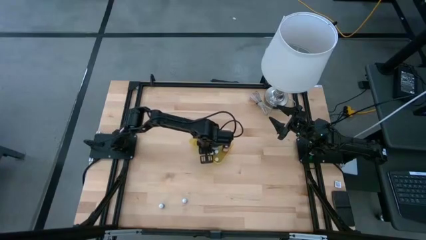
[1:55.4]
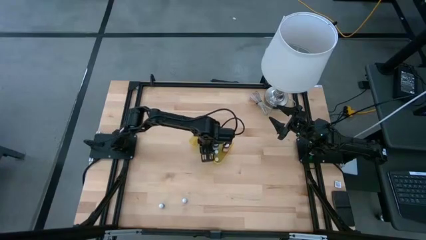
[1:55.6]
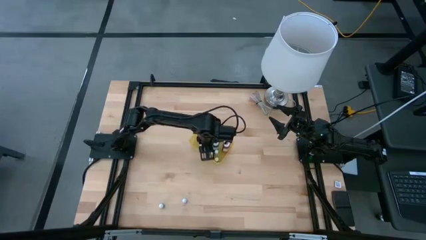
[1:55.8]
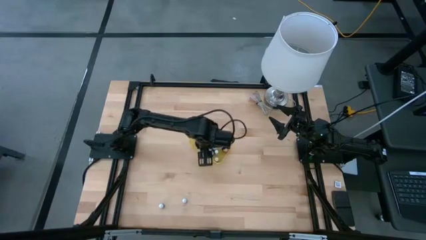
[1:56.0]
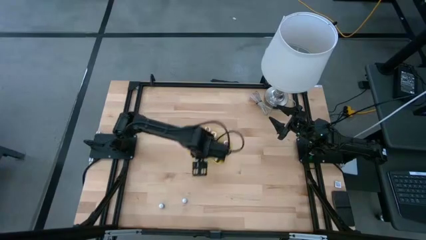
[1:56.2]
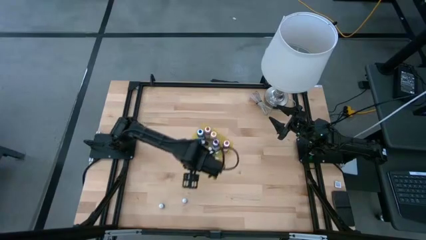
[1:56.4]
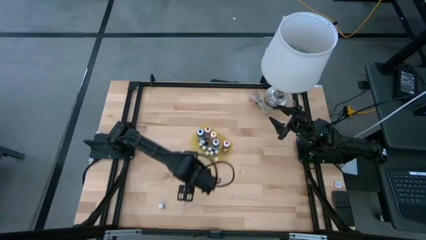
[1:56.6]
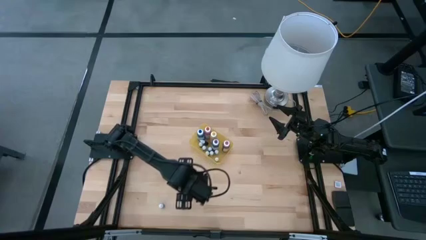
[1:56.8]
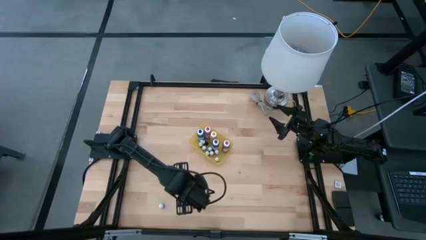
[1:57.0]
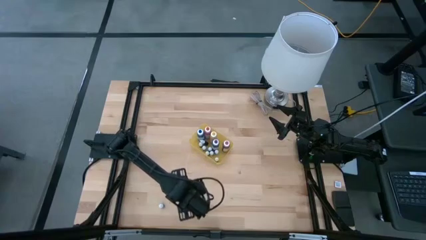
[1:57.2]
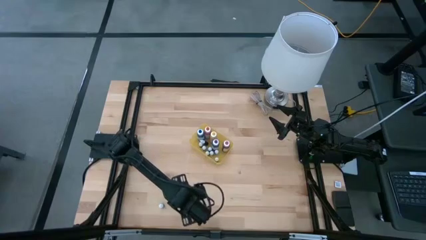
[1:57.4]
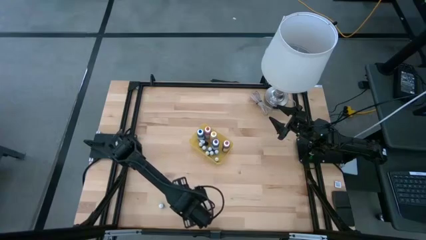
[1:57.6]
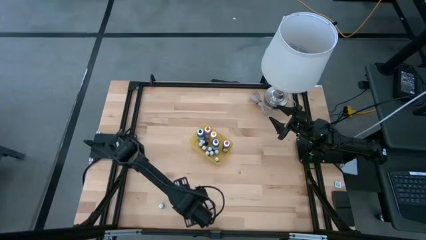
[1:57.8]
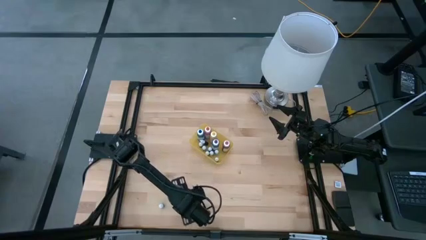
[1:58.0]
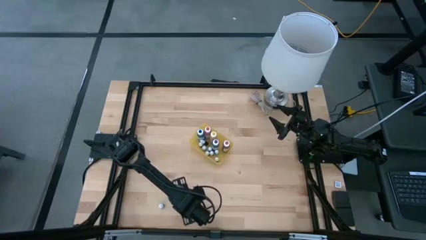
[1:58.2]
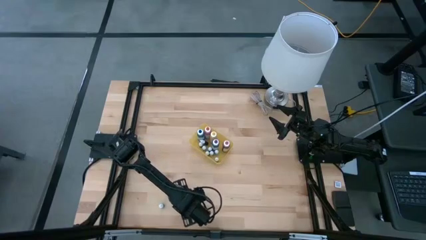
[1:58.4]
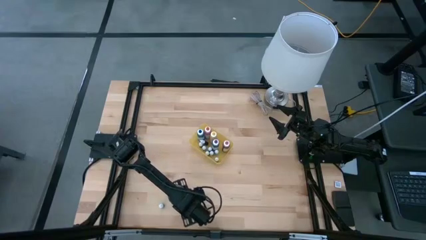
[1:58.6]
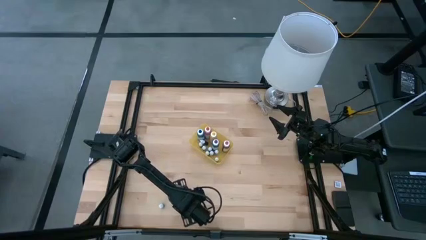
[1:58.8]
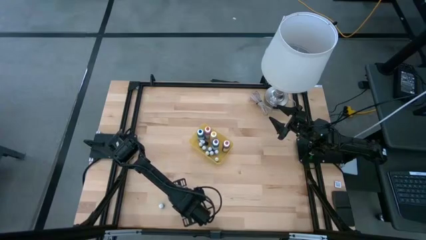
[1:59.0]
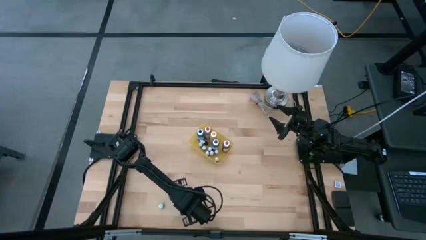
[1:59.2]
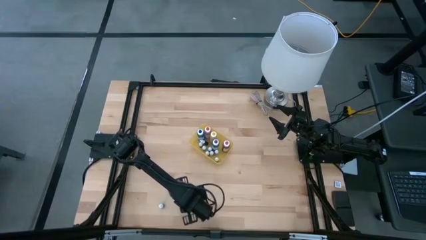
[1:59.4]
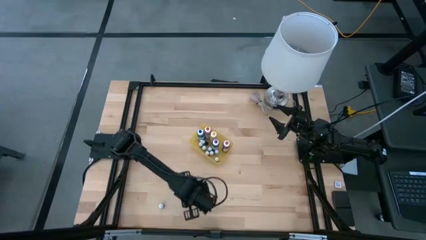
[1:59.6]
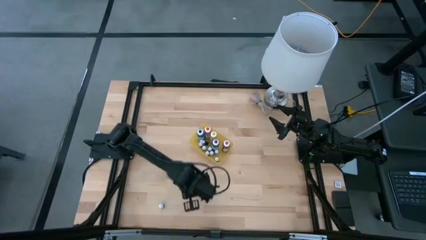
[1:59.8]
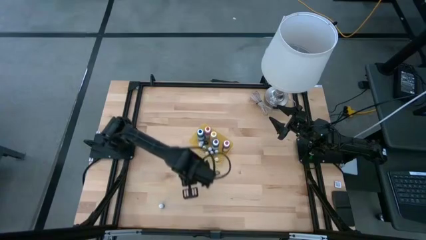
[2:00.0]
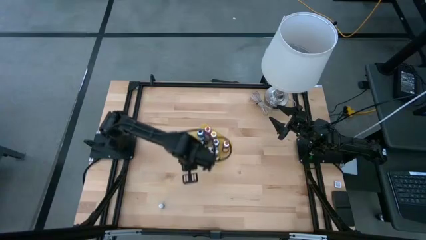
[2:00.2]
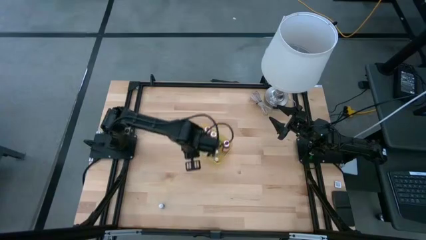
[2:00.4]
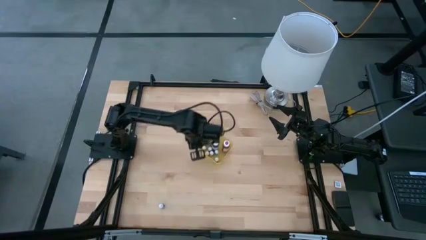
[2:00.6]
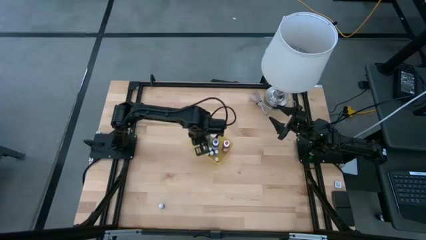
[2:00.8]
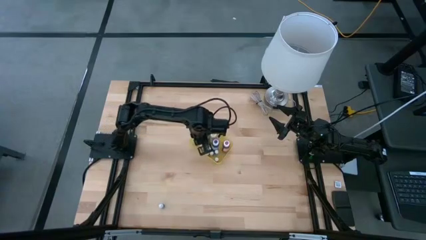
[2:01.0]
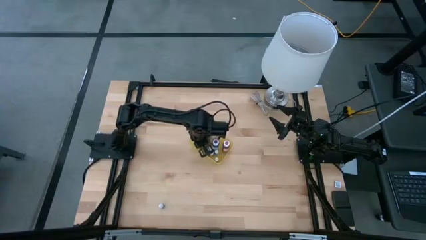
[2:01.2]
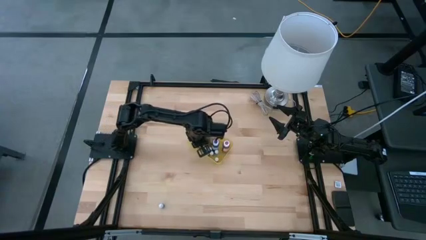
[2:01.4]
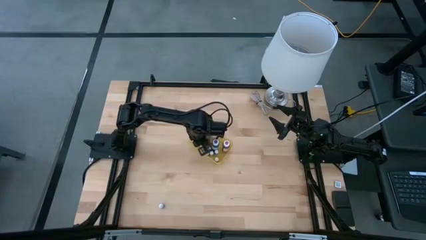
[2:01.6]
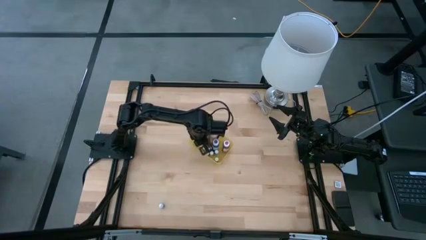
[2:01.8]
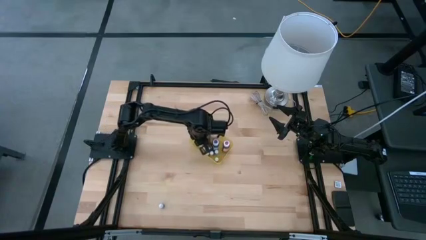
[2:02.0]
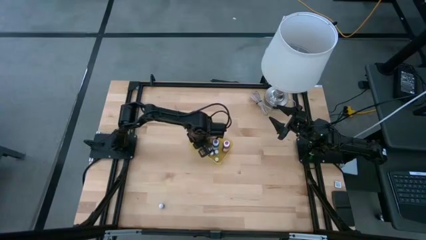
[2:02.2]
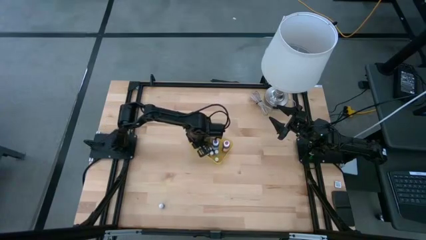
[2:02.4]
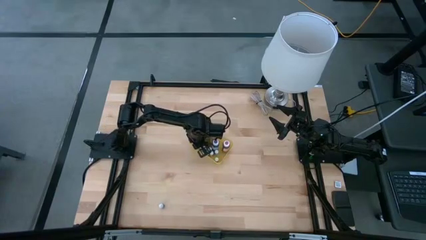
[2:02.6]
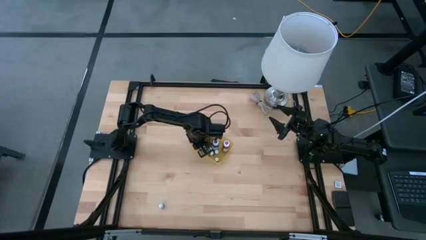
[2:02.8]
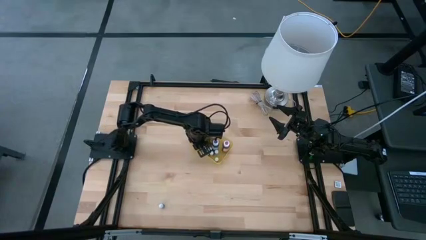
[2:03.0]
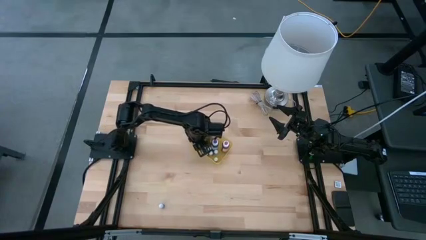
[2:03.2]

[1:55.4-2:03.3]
Task: Pick & Place food coloring
Put the small black food coloring bottle into the yellow bin

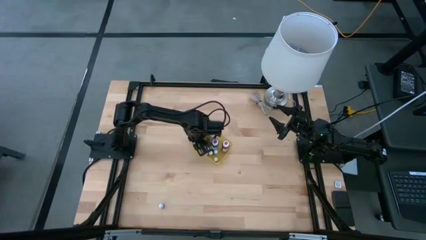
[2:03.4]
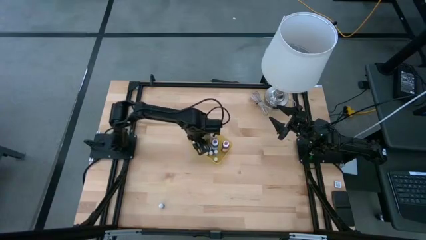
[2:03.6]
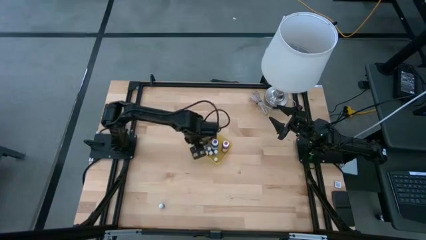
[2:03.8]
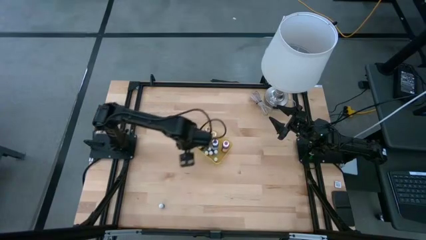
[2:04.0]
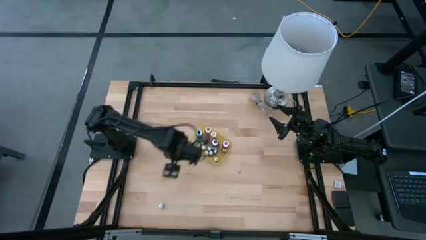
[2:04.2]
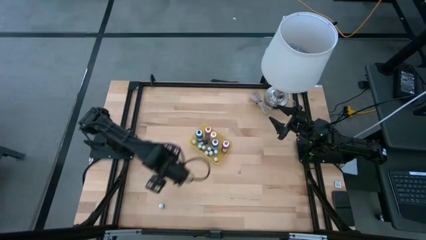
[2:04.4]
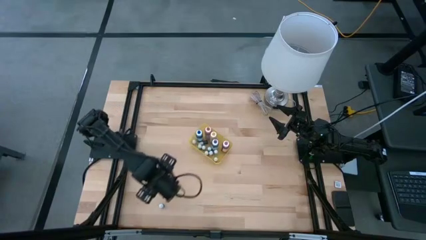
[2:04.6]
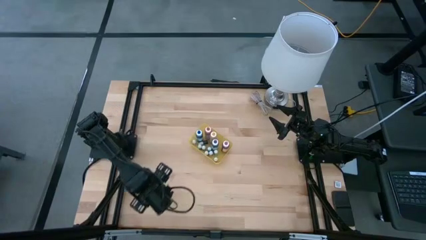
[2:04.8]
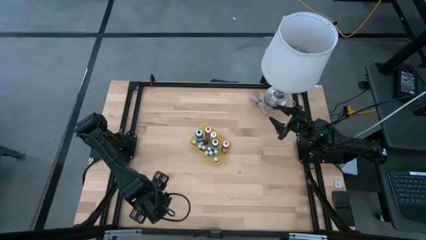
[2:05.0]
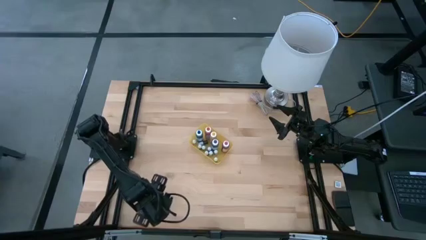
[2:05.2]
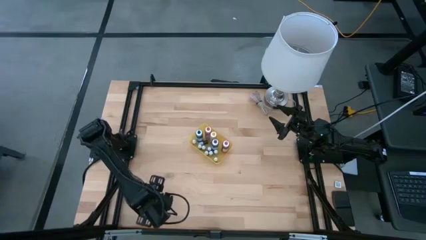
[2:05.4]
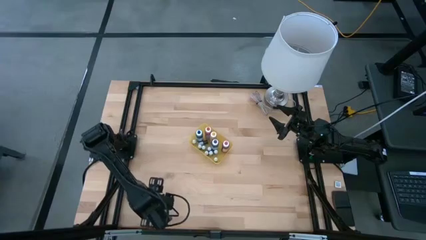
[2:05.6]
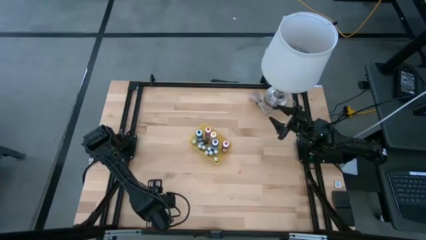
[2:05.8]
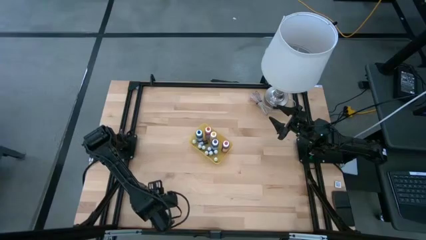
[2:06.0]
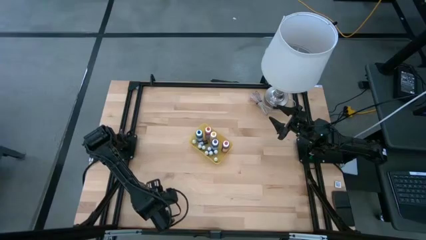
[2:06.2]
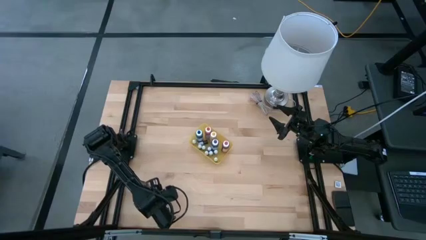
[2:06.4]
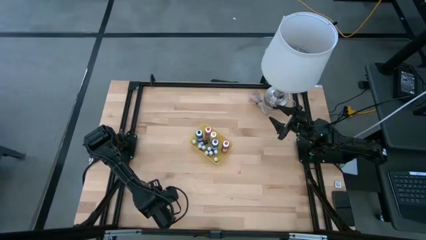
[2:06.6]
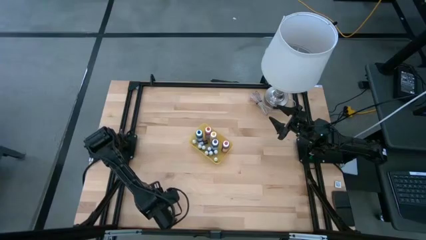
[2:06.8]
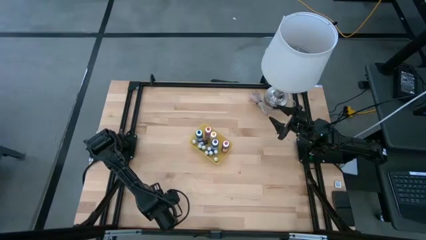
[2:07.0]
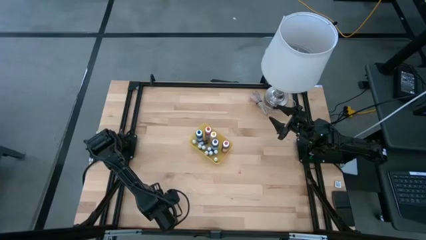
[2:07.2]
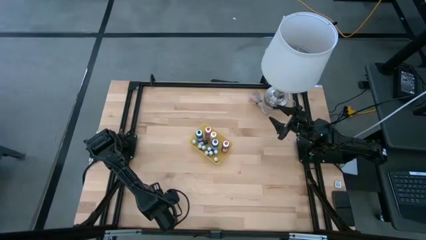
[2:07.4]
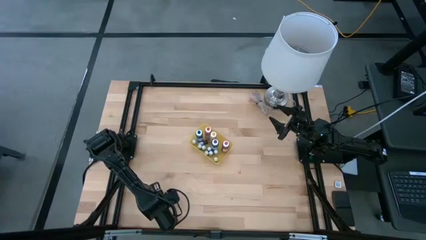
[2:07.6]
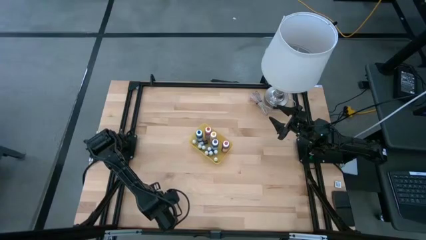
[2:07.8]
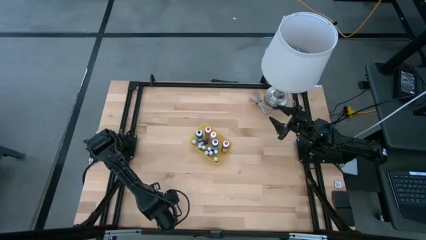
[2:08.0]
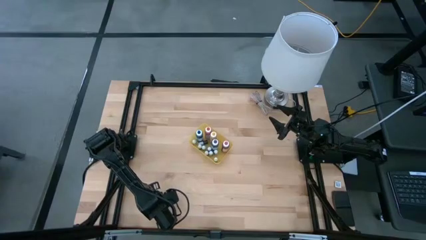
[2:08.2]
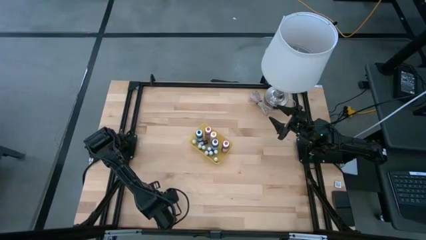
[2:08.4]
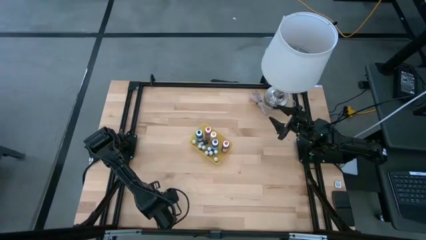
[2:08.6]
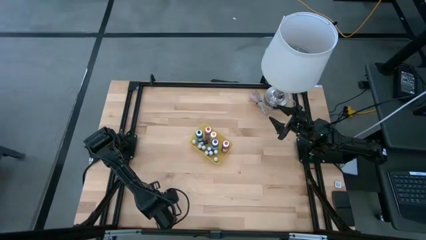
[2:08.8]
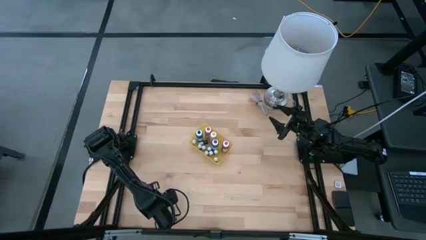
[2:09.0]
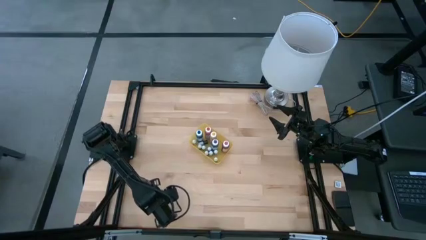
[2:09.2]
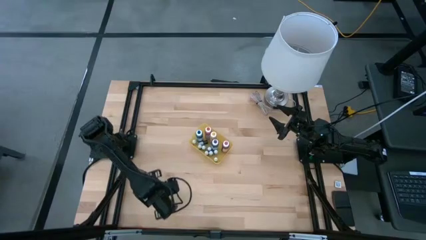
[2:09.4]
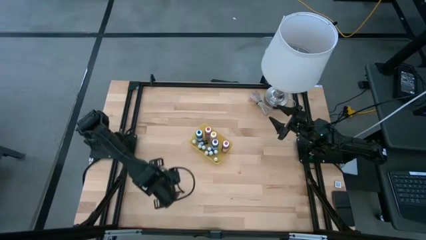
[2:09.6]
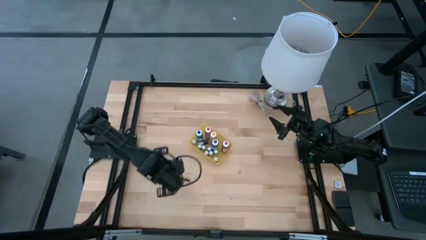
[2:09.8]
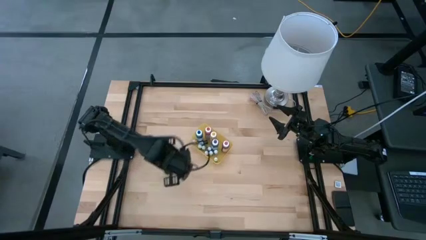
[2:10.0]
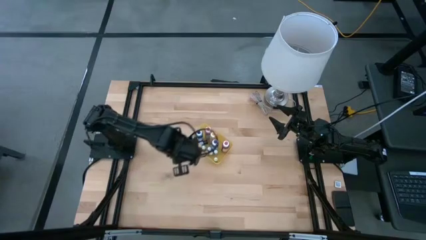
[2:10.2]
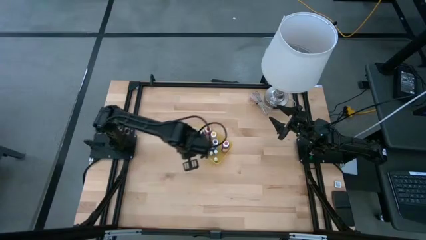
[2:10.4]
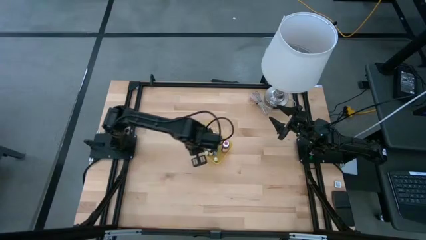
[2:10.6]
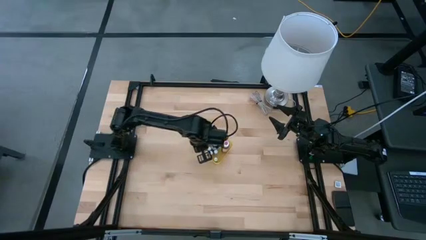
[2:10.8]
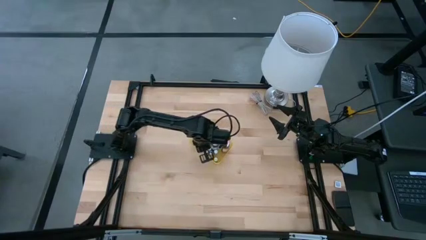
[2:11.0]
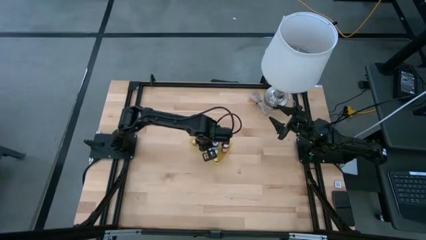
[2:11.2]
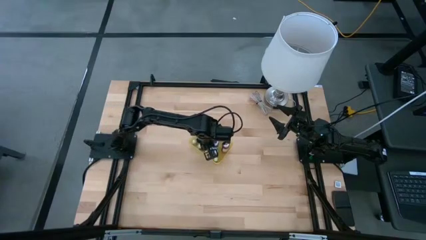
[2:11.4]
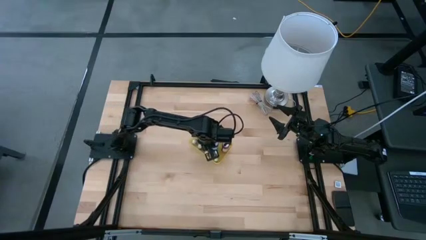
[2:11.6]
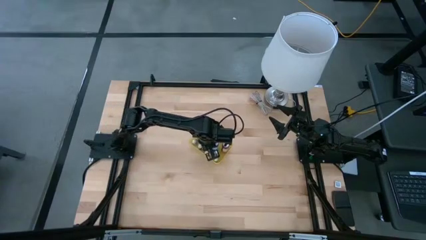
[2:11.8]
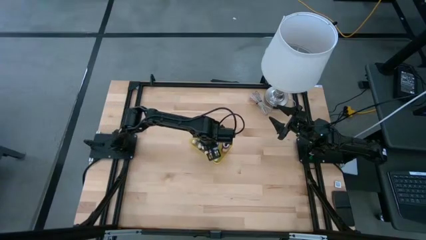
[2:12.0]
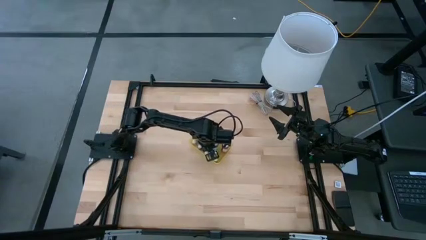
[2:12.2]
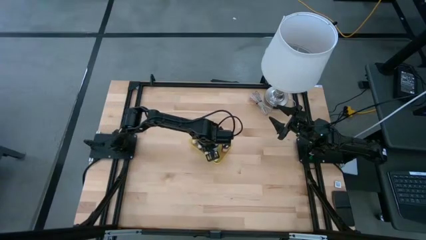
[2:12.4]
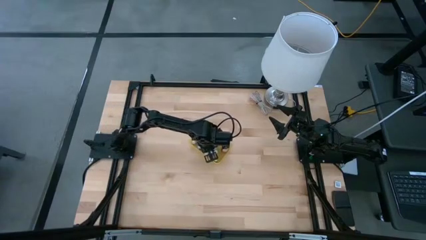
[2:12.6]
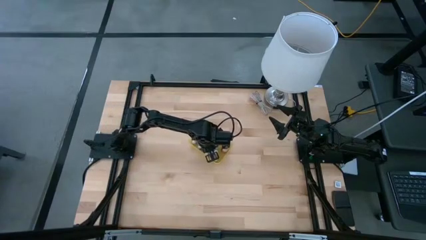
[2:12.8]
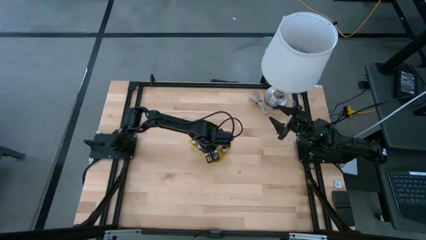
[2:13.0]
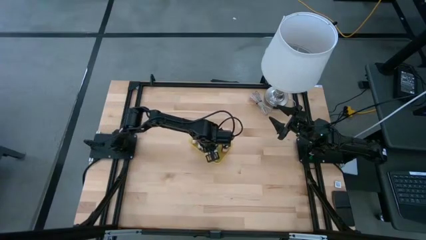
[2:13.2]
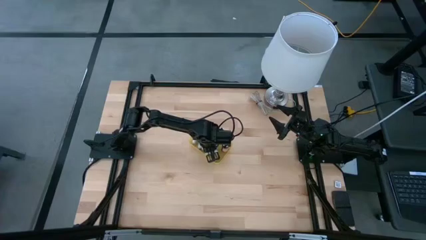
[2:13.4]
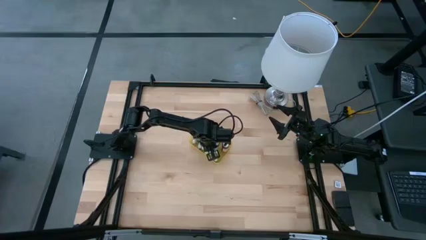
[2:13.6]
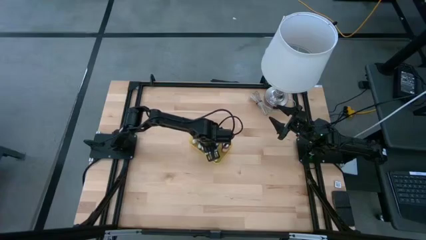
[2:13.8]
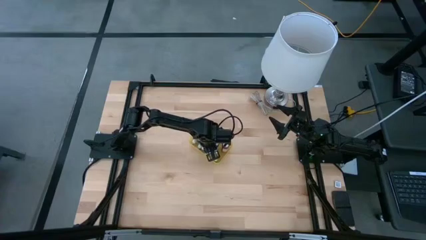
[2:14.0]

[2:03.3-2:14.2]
Put the small black food coloring bottle into the yellow bin
